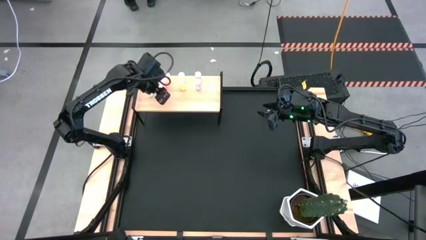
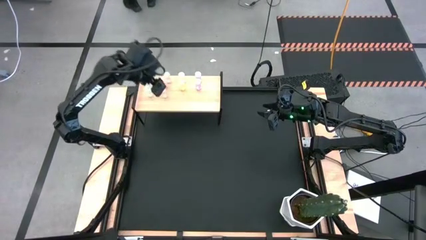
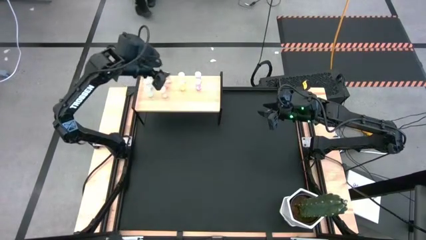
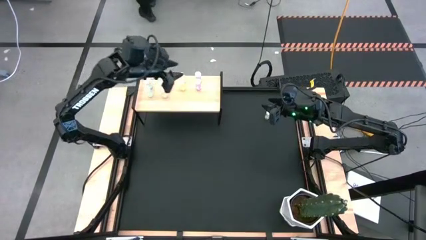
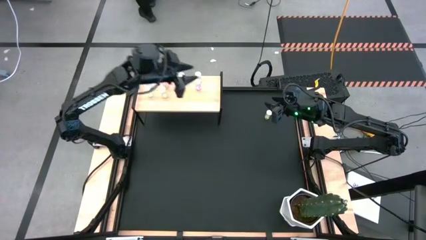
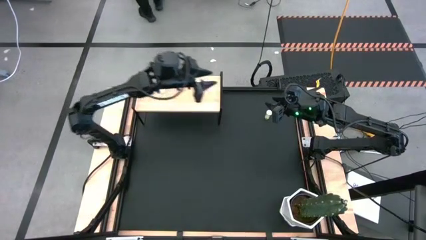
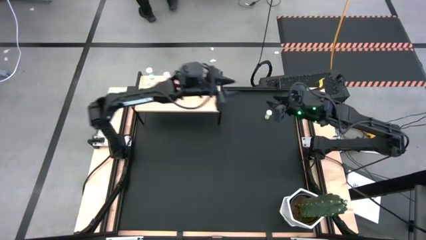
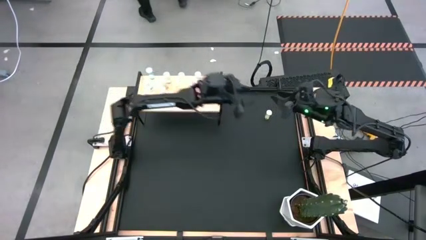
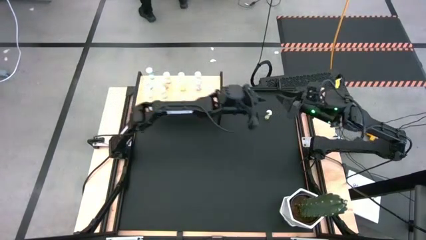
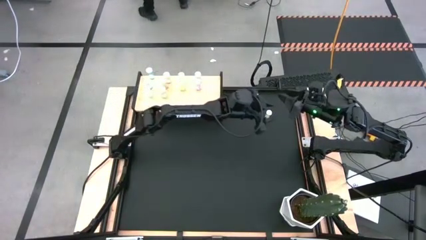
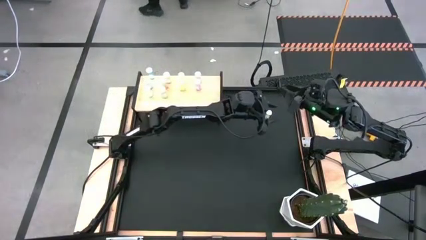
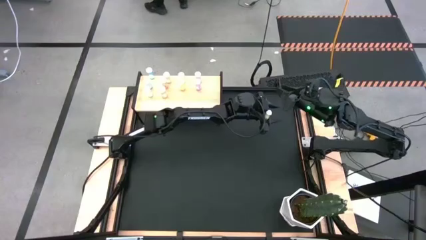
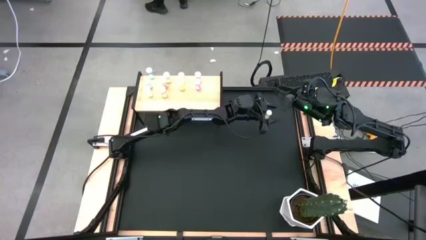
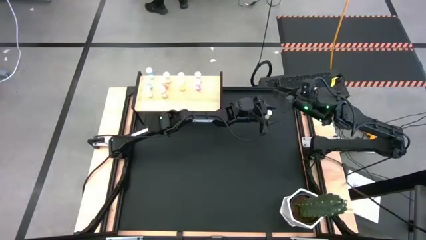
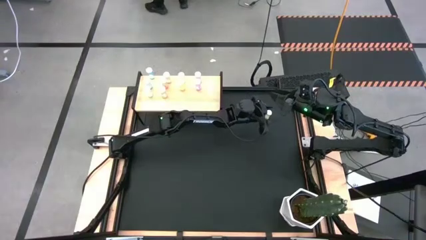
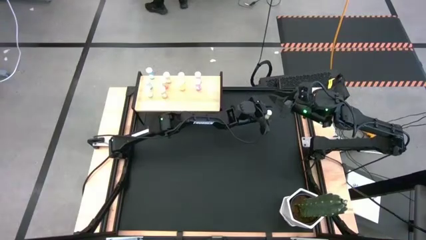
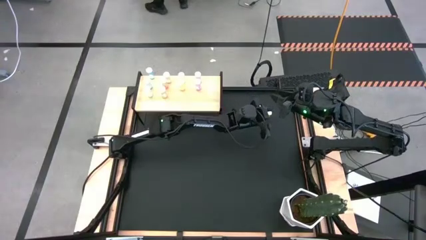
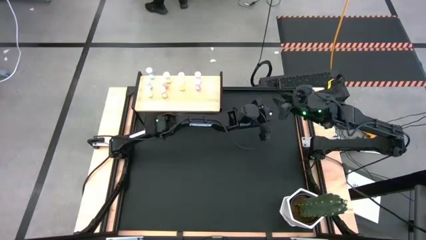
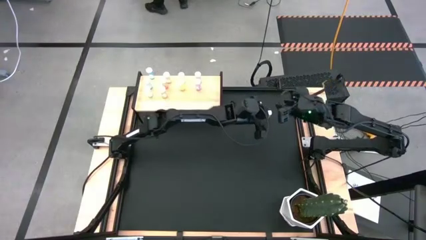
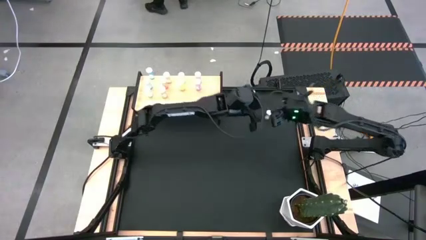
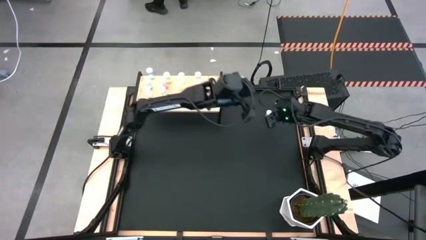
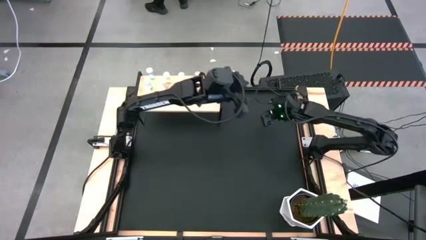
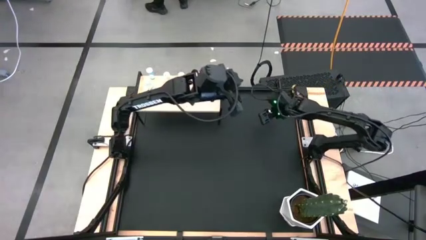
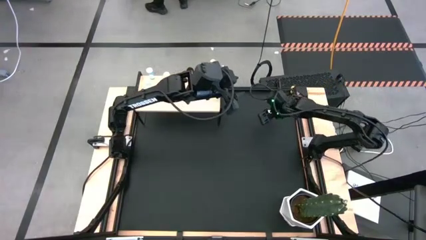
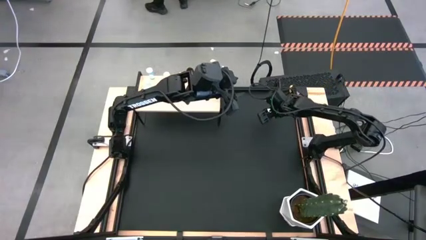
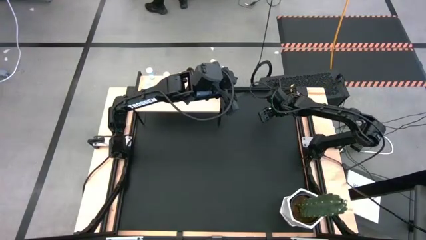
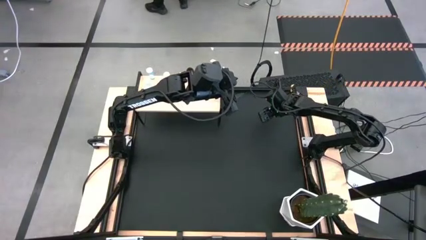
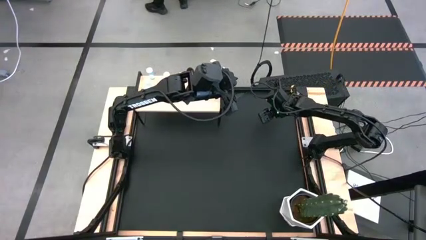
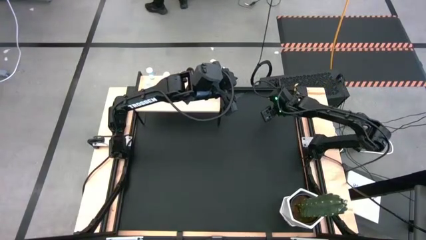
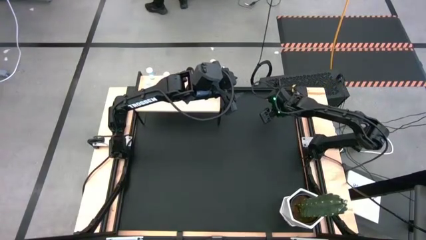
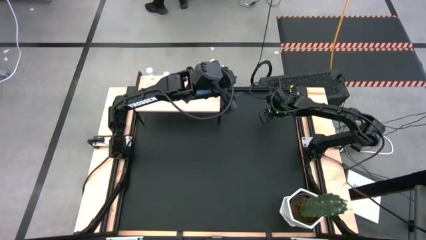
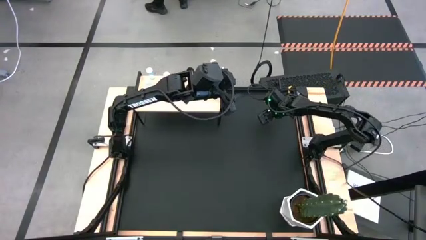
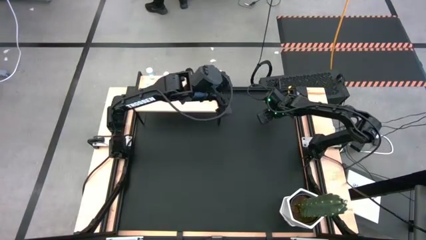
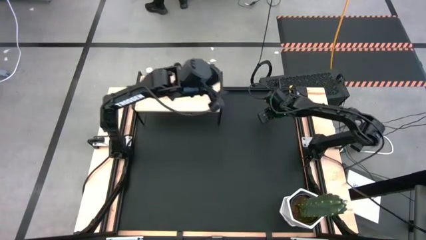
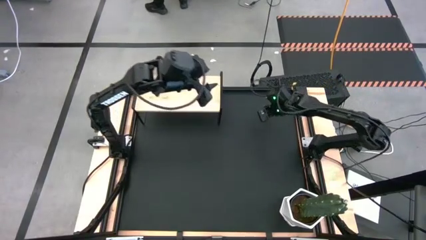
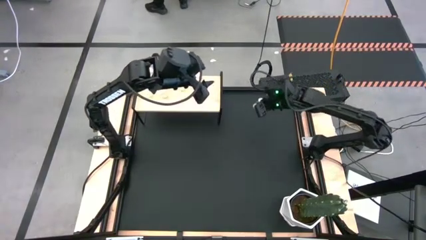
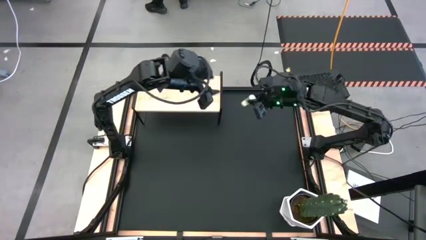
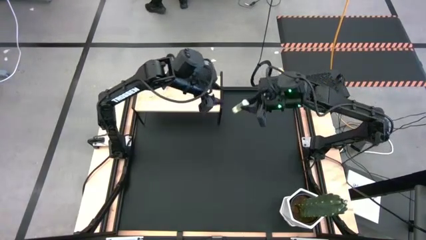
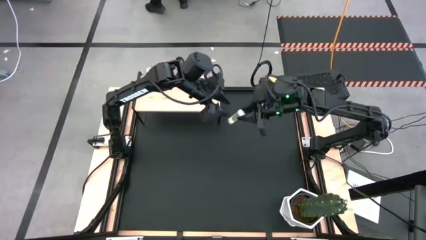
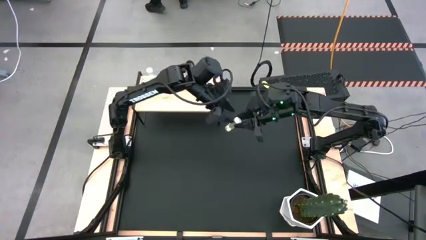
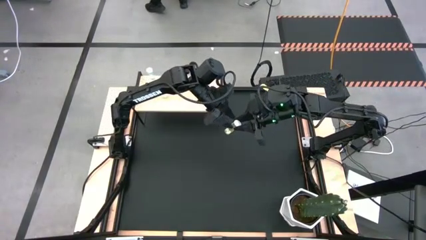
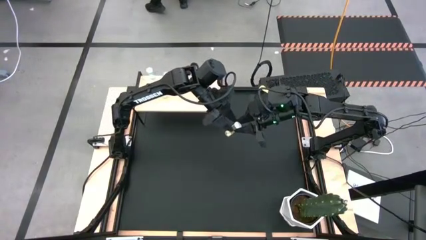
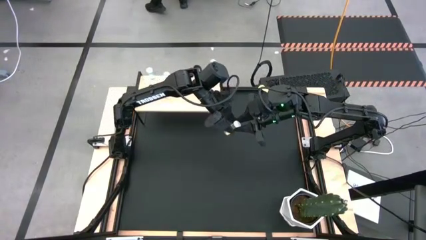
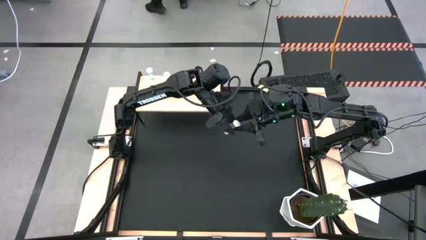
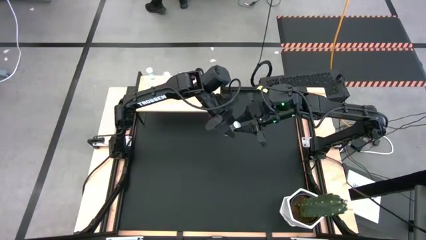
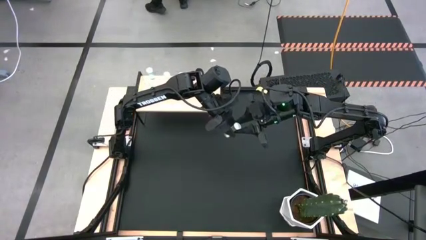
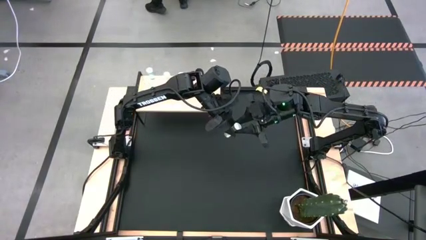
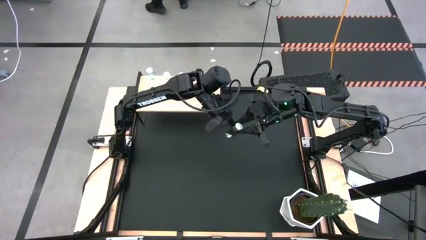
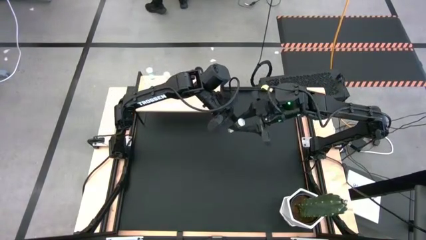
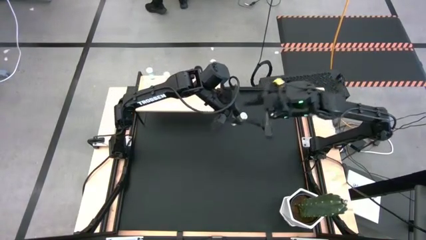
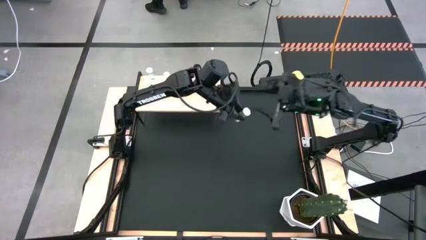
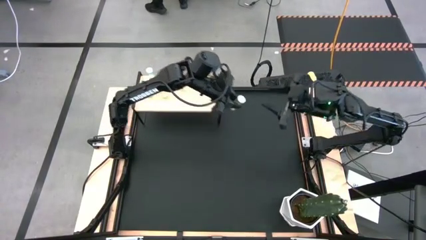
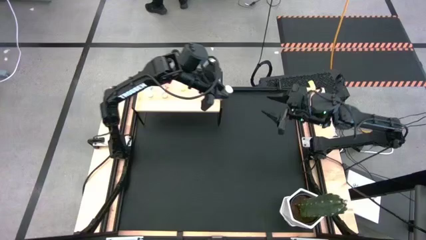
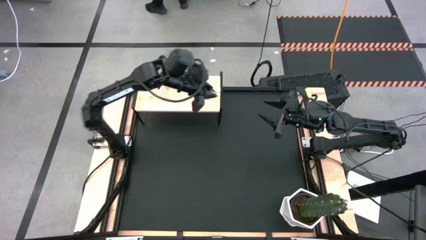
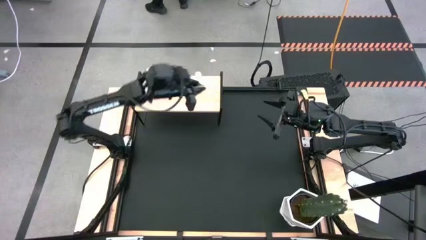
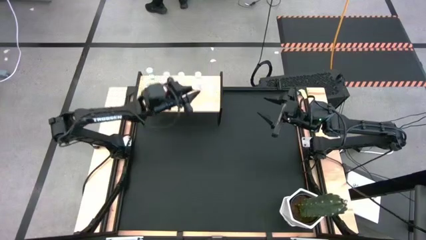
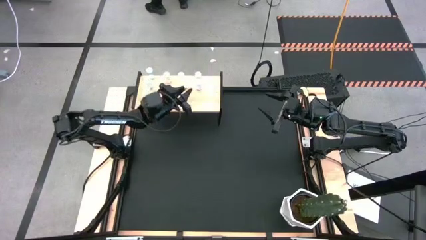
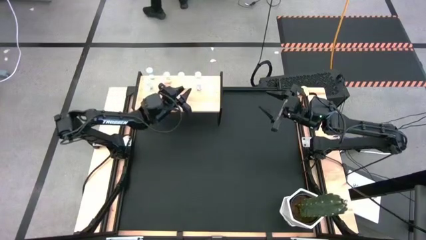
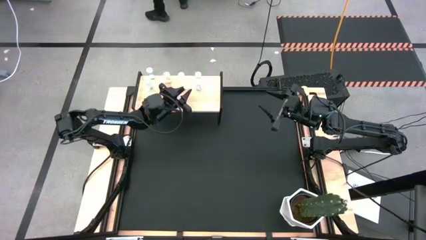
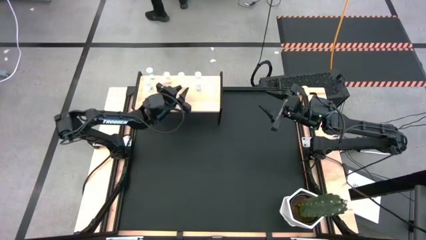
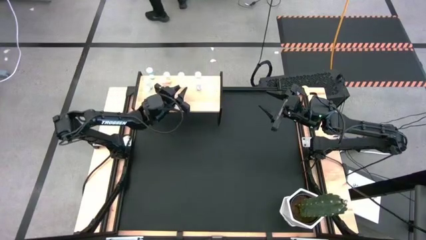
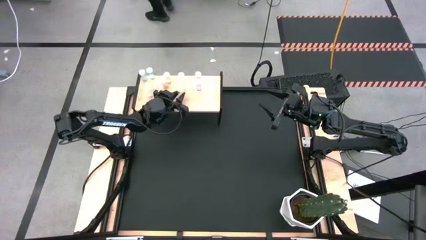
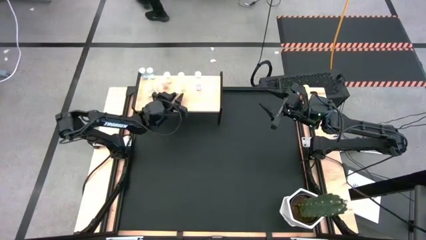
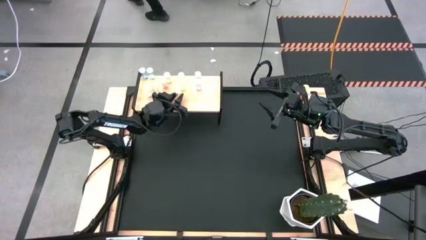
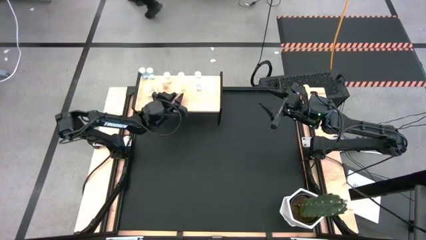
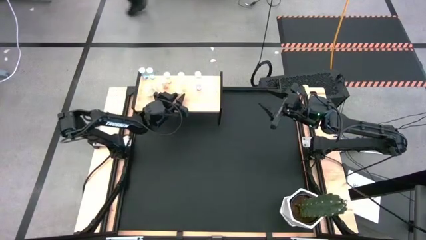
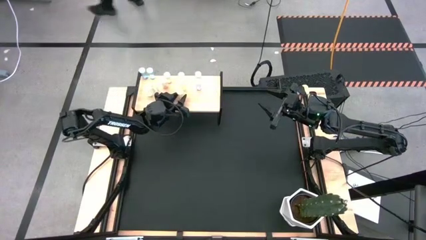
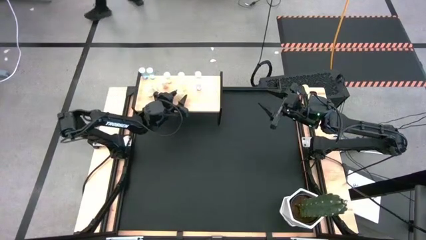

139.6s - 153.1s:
Task: Pick and place medicine bottles onto shelf by color
Put the yellow pill bottle on the shelf aligned with the yellow pill bottles
